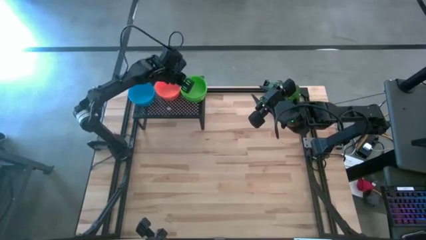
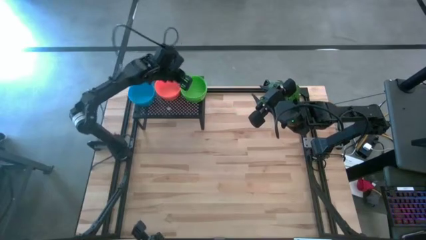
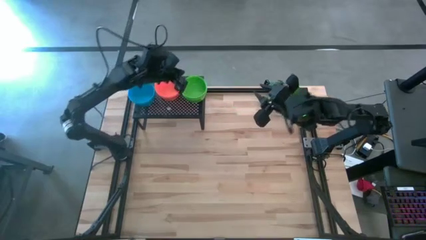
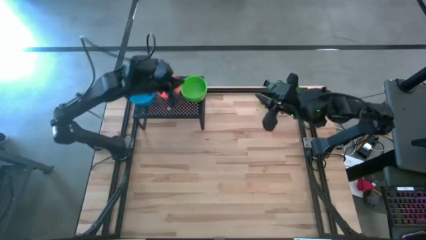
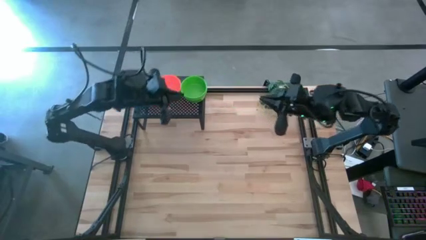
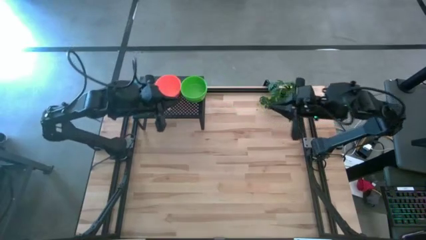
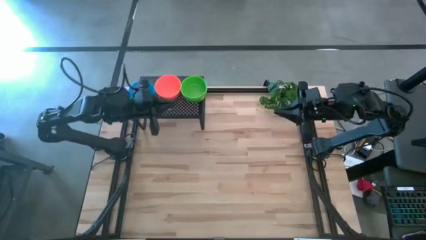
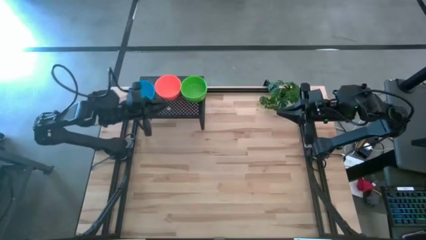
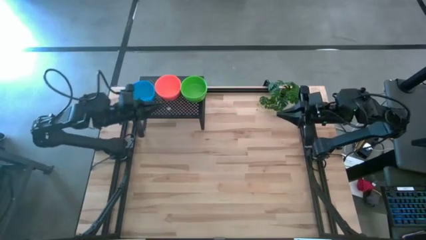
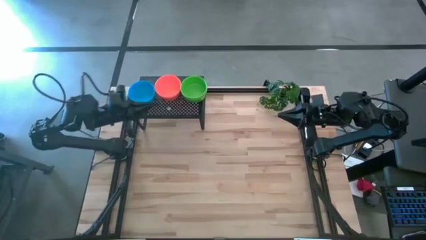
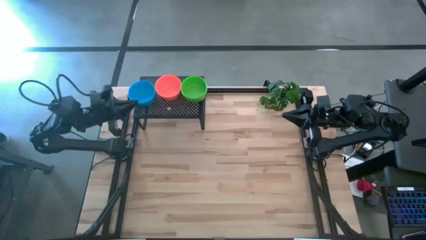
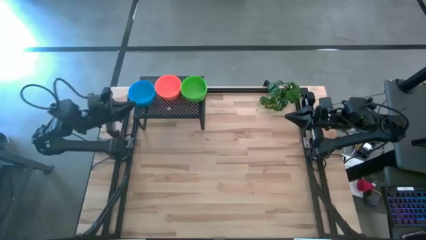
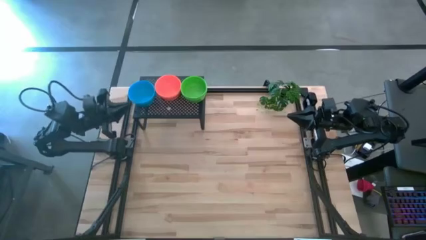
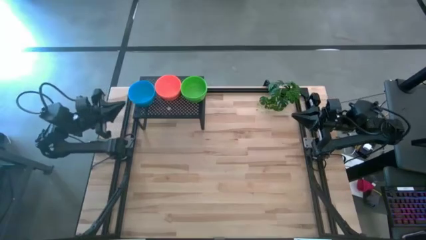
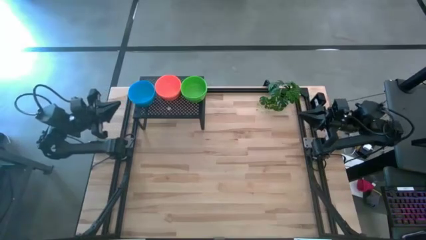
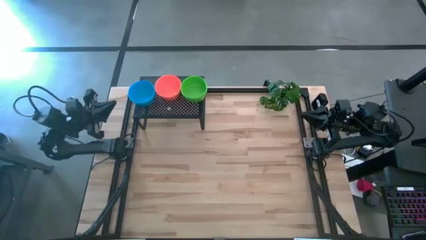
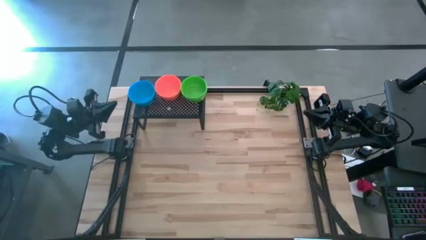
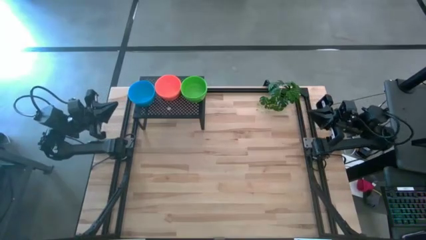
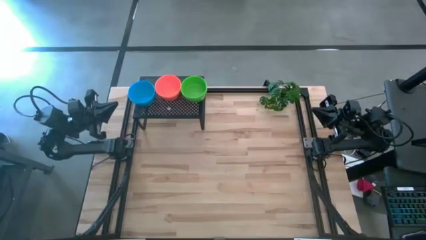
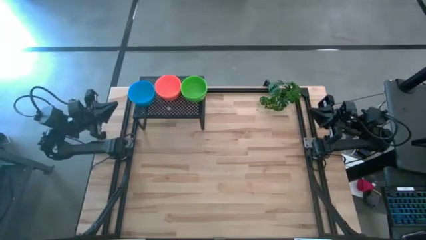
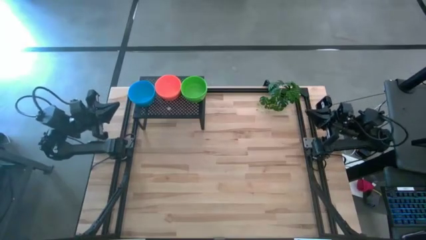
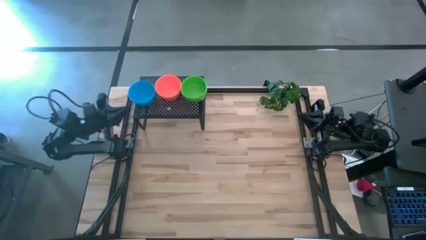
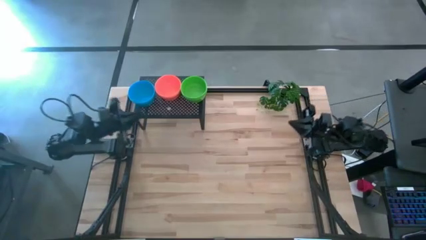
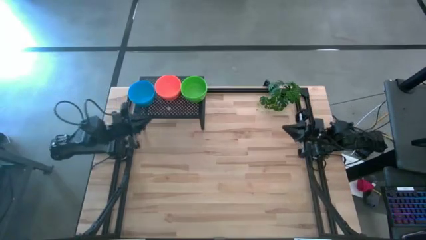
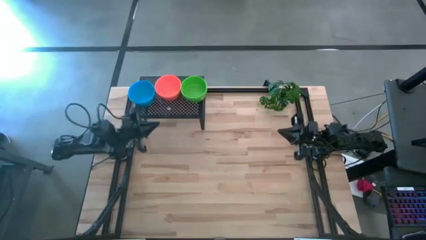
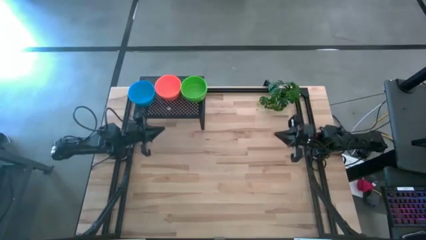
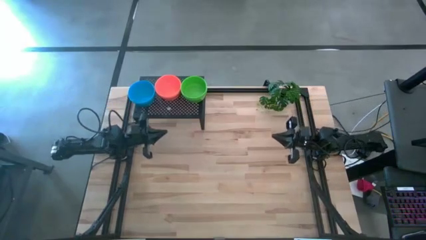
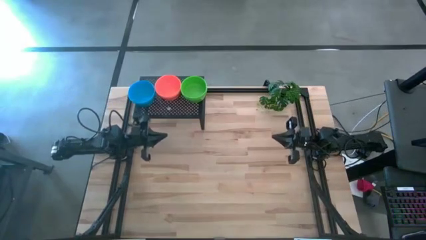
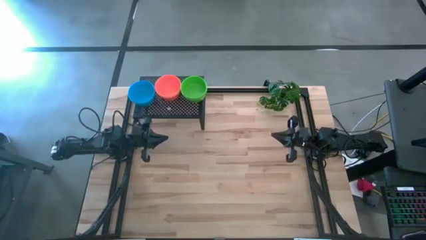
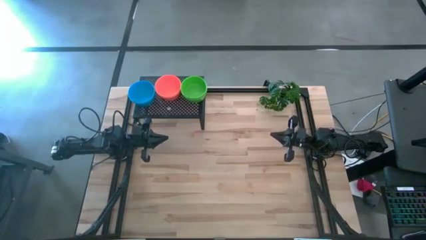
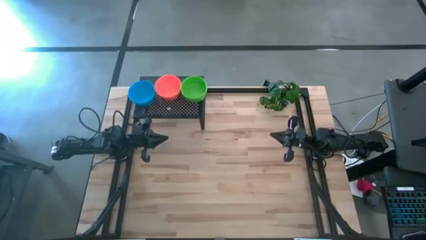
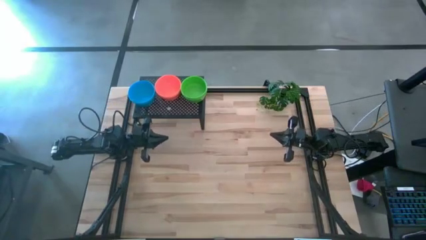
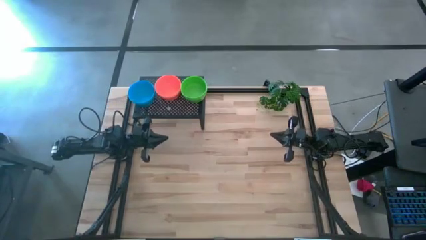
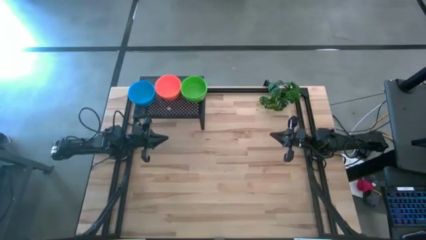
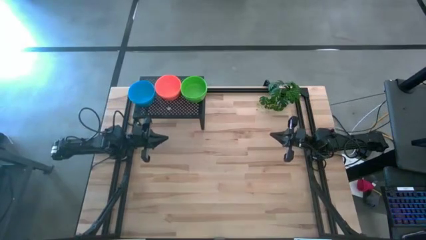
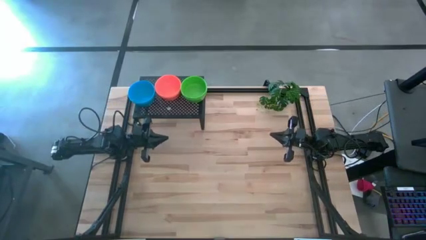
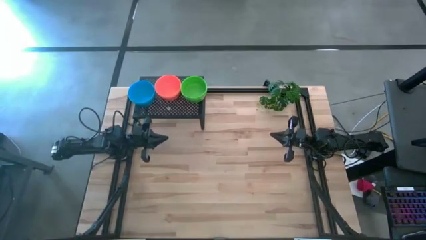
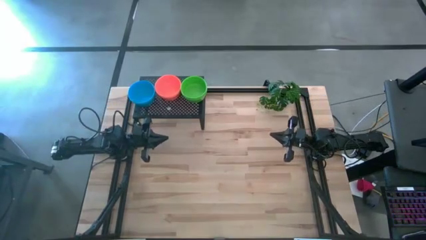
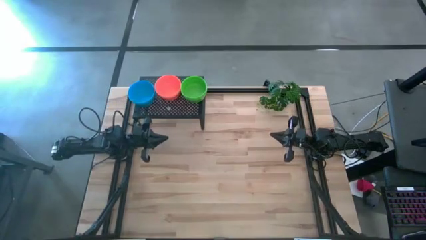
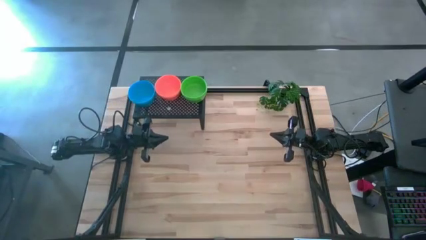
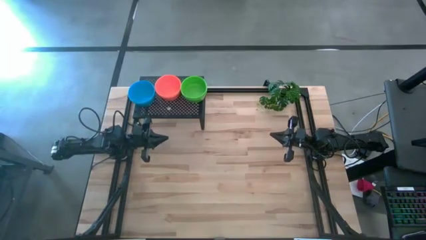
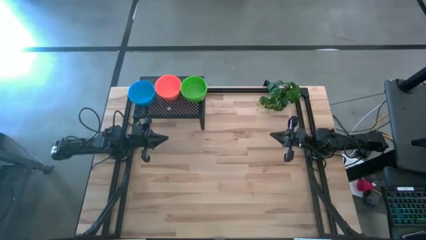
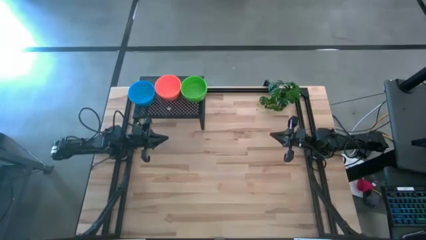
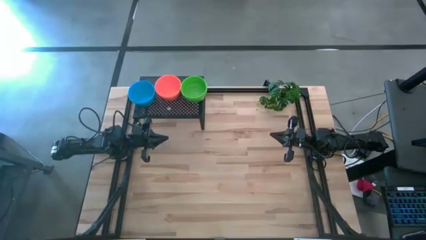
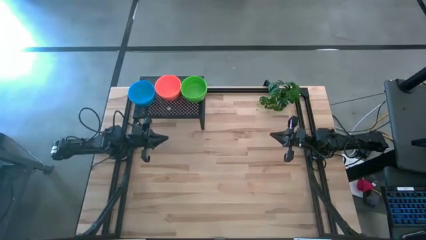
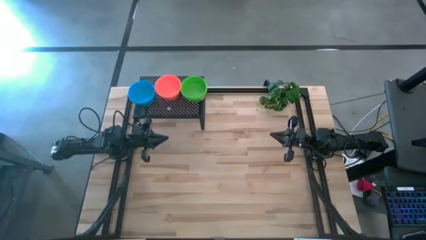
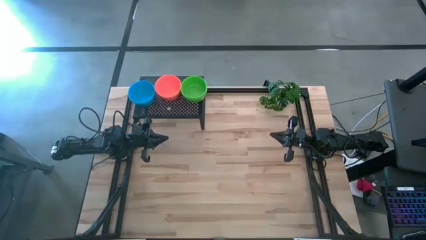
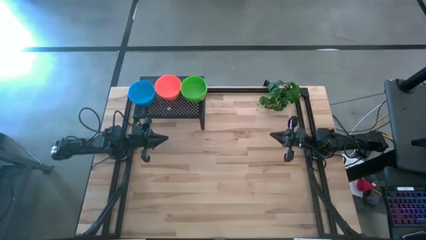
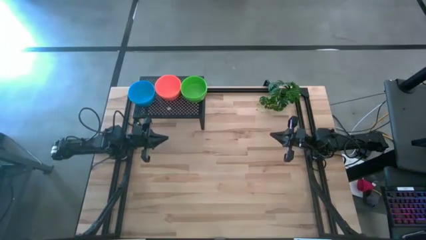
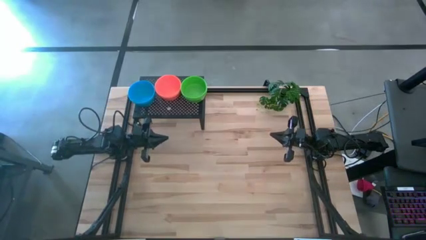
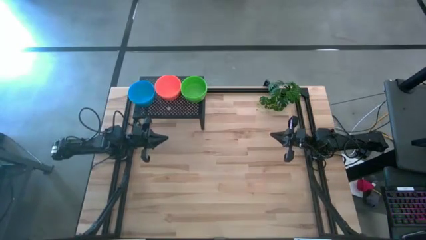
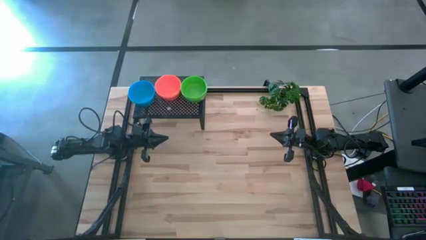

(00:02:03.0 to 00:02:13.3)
Task: Pick & Place Mini bowls
Return to Home Position

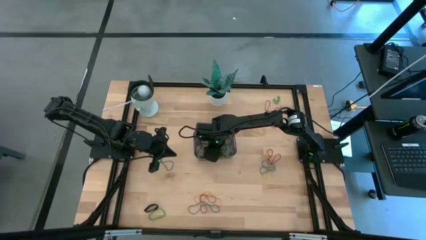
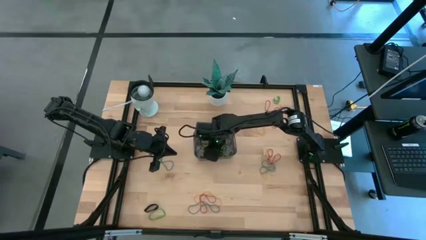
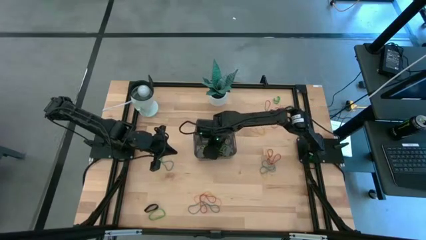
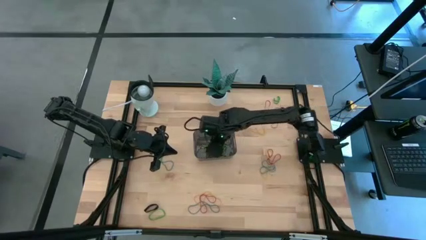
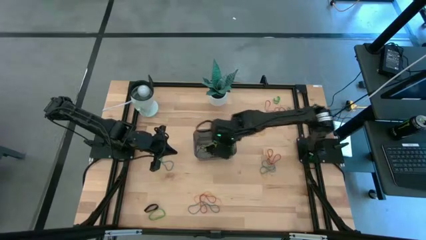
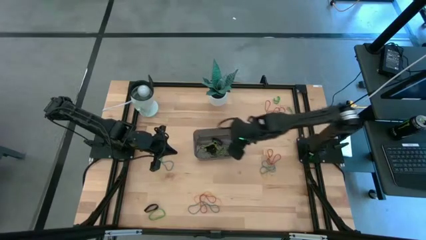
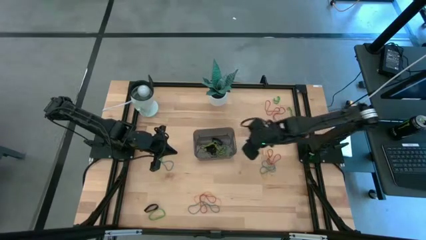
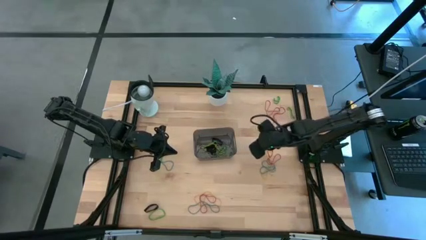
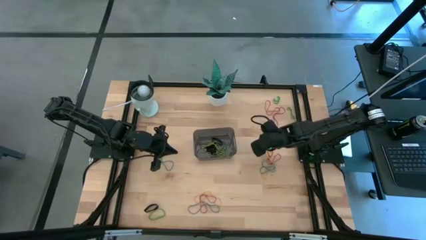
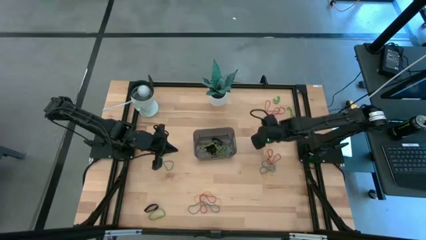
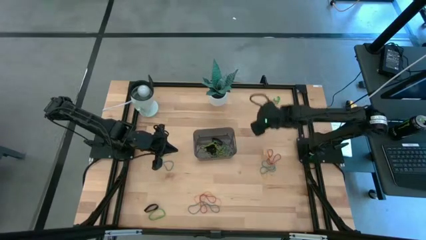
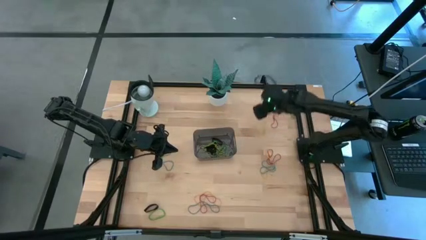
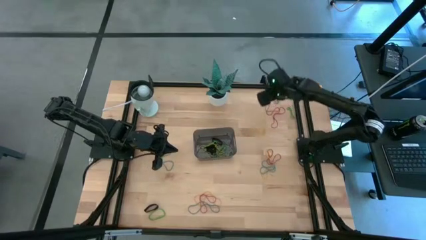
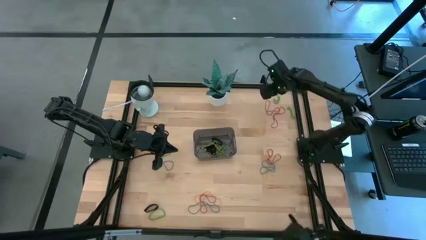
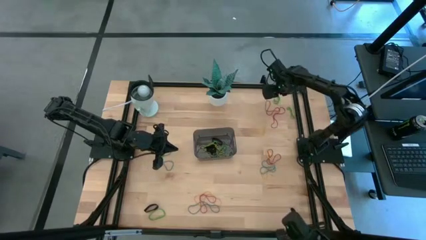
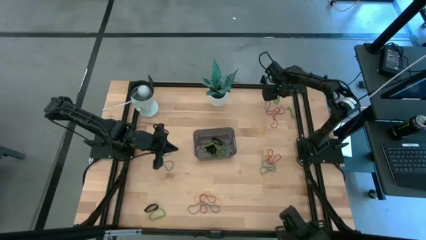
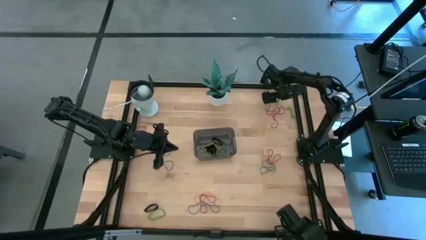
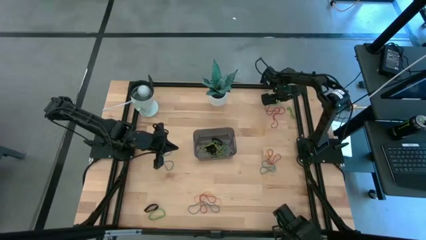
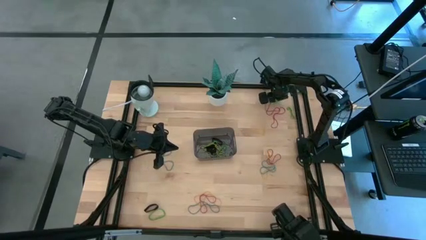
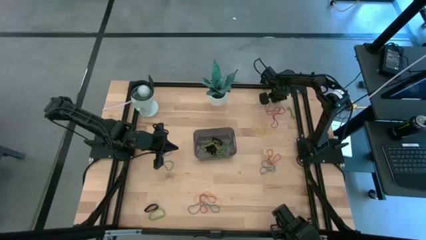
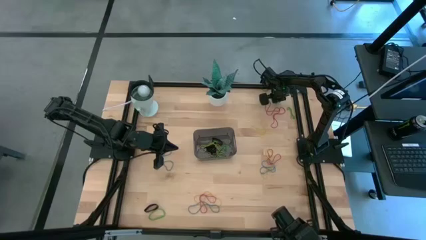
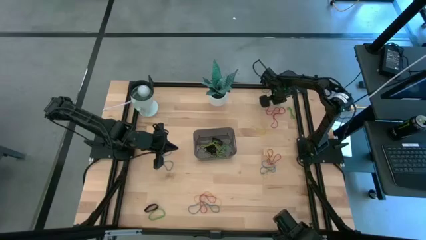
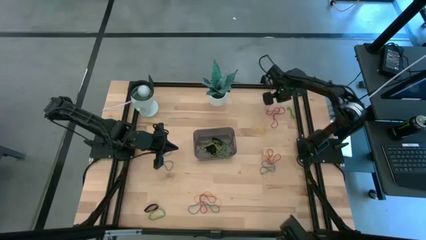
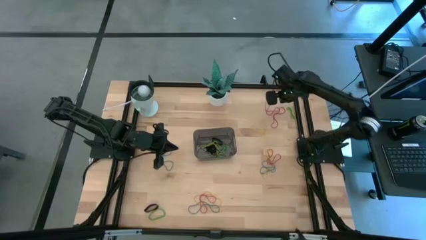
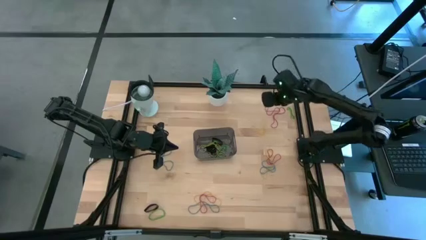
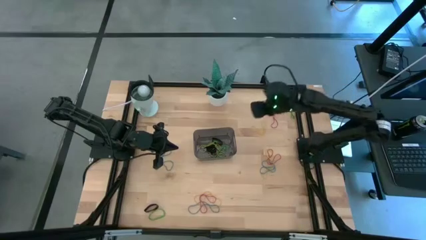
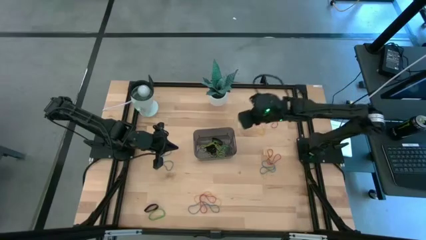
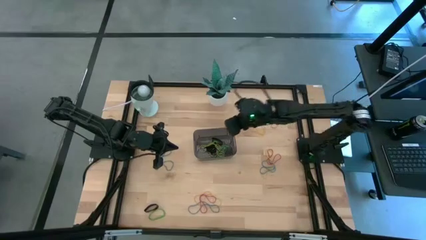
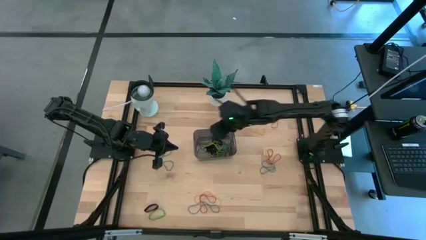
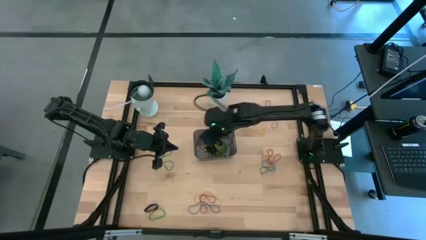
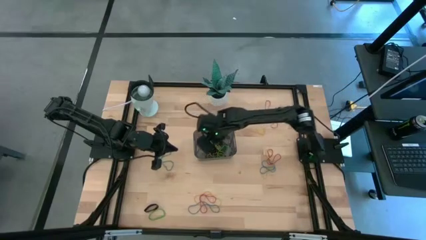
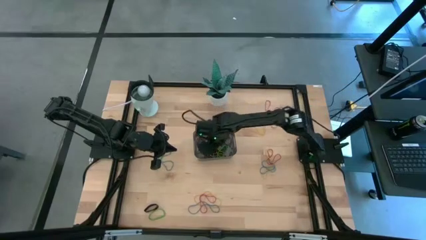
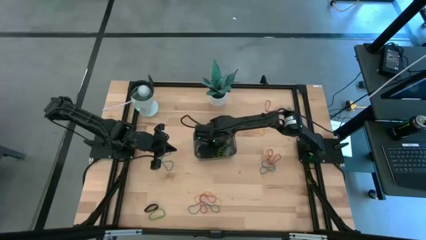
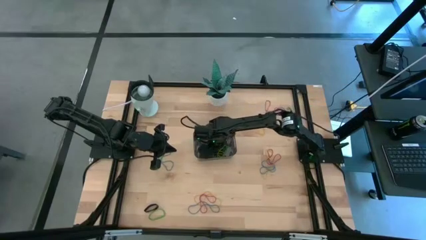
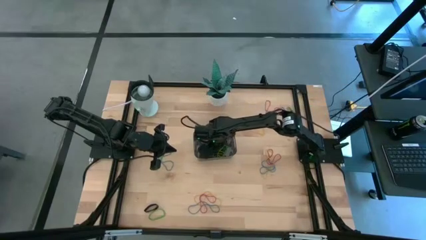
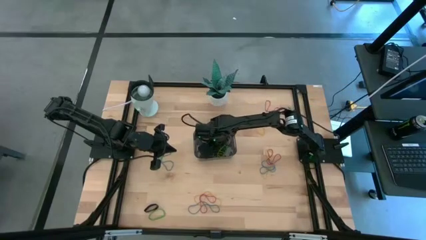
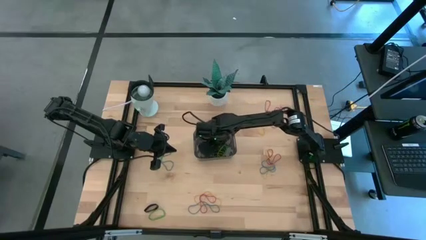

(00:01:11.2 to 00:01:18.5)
Task: Pick and place rubber bands into bin
Put the green rubber band into the black bin
